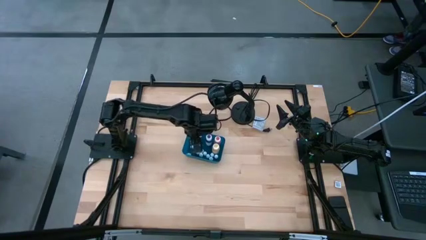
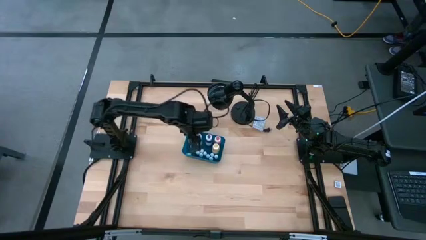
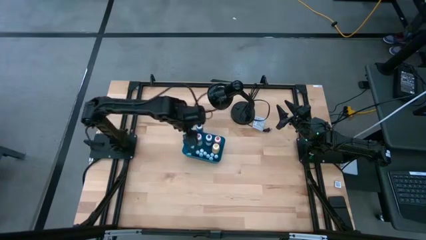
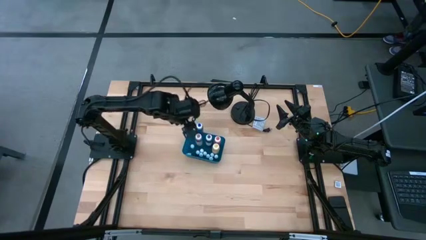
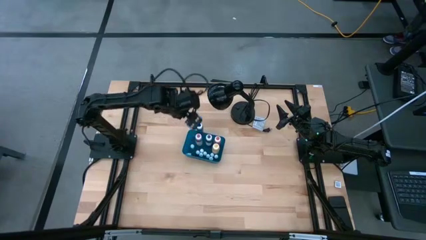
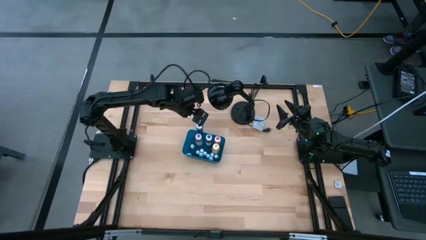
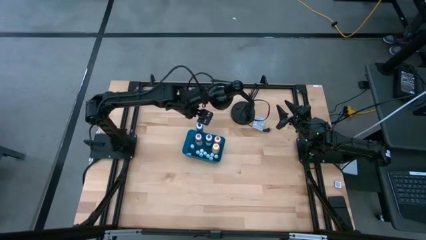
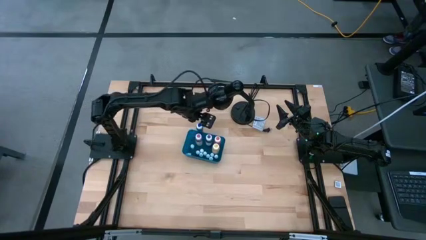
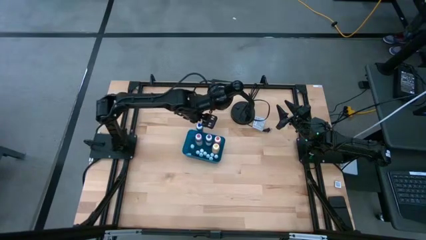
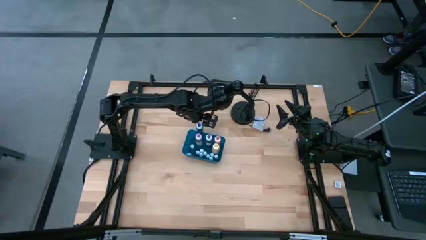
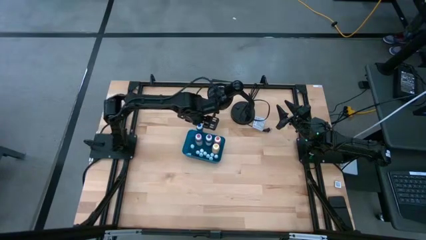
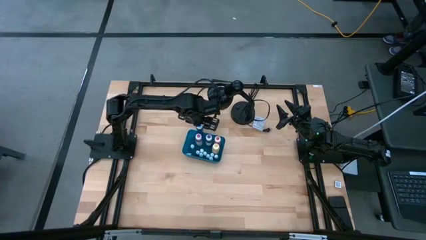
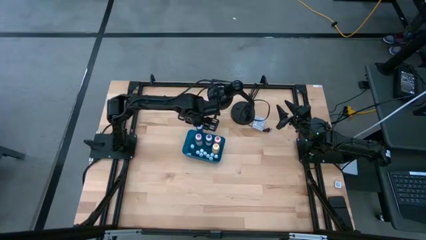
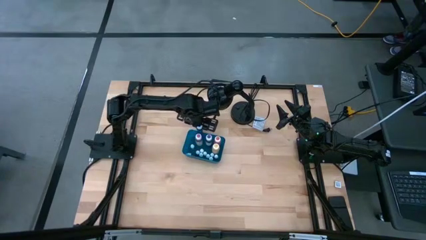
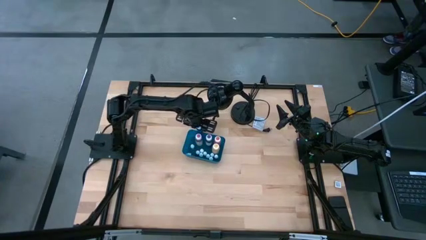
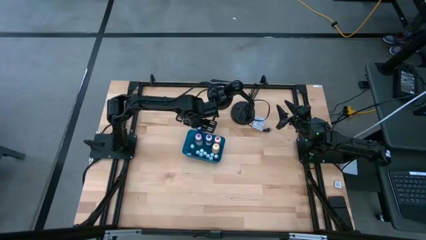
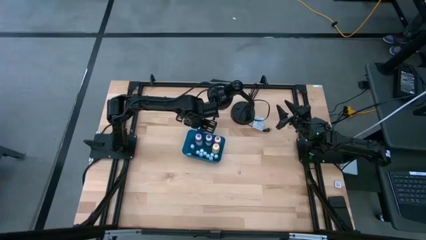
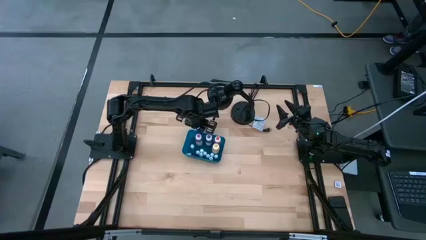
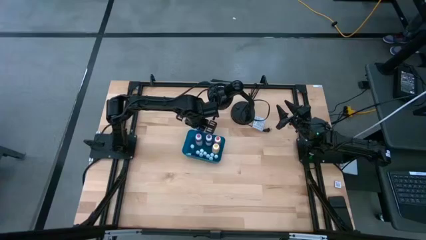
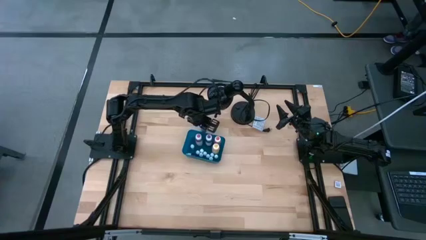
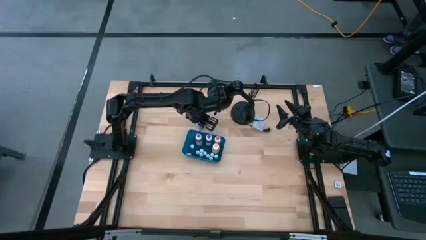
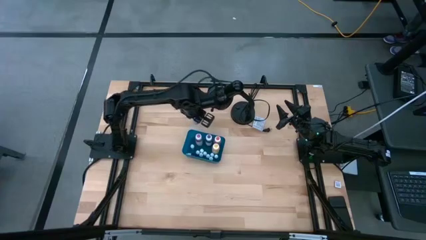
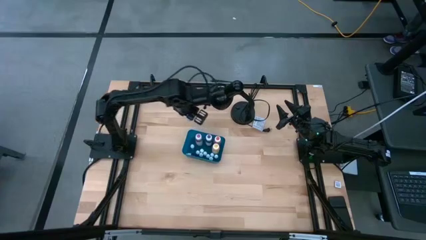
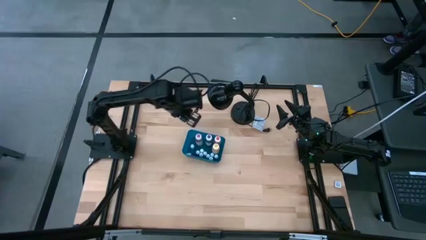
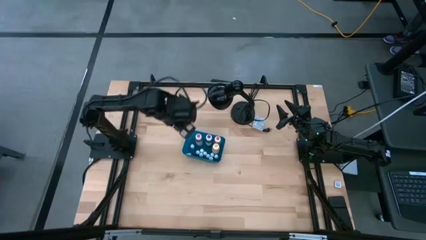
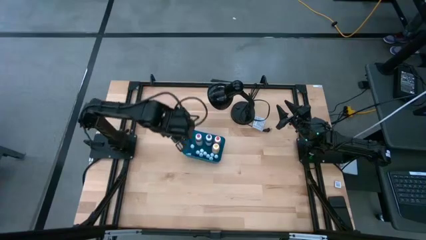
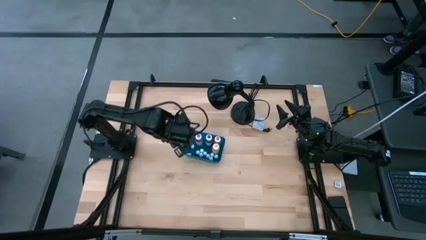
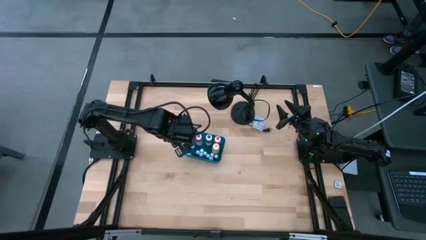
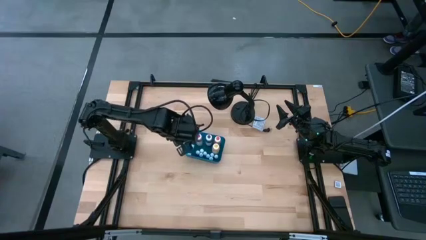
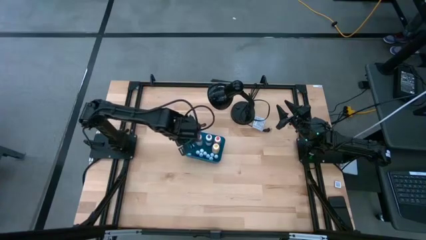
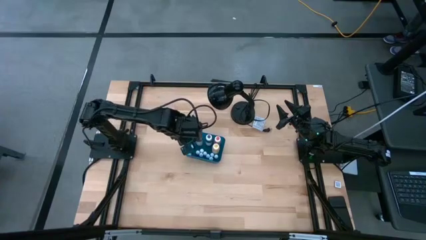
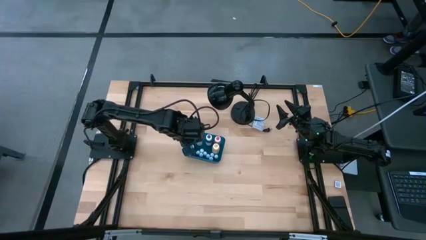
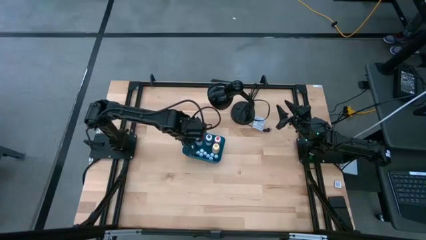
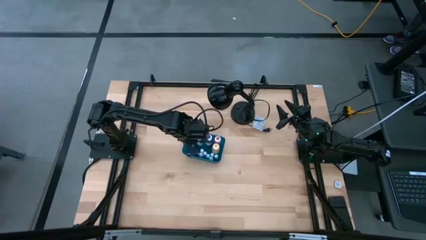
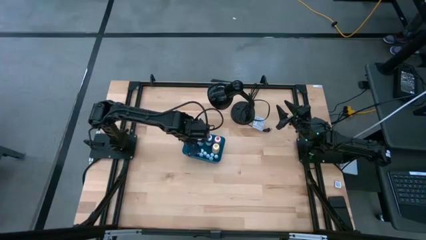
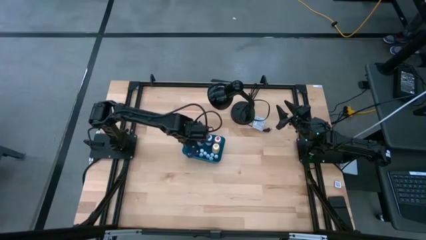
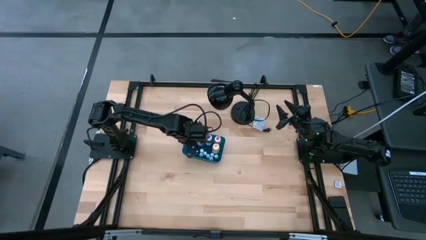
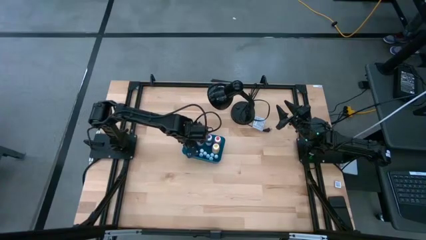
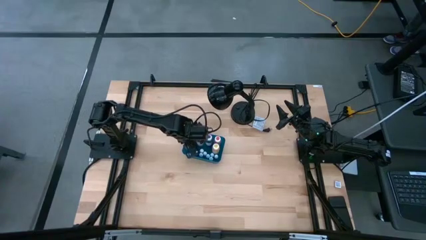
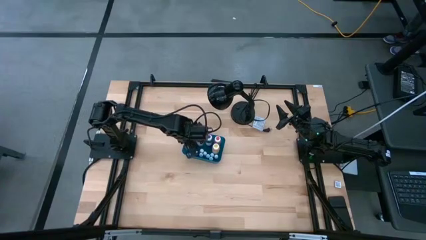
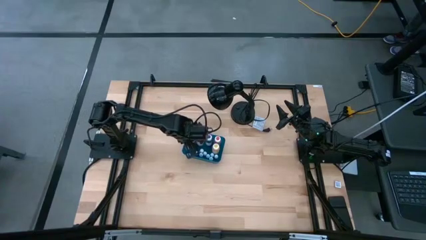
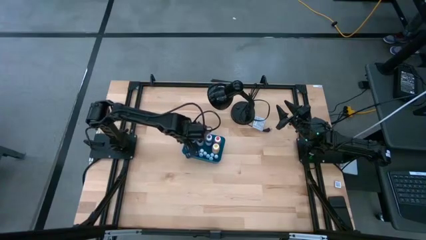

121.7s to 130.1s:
Task: Pick & Place food coloring
Put the large blue food coloring bottle into the blue bin

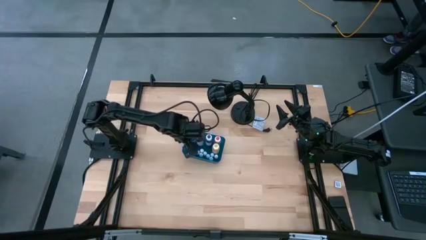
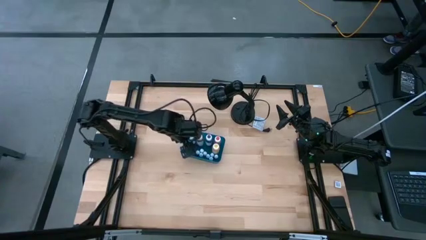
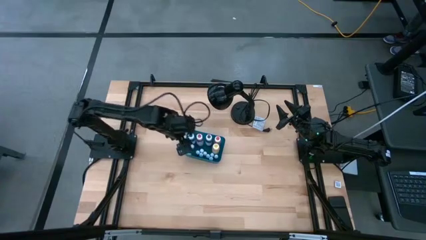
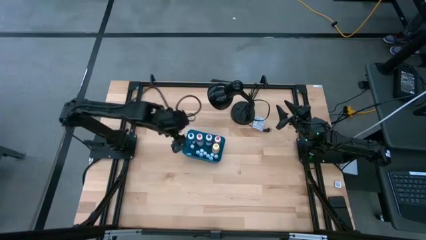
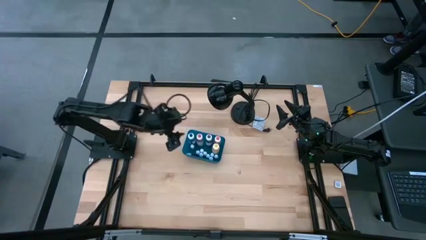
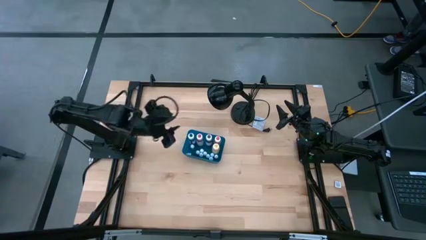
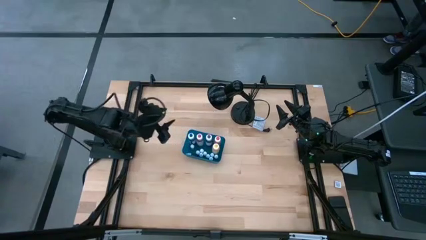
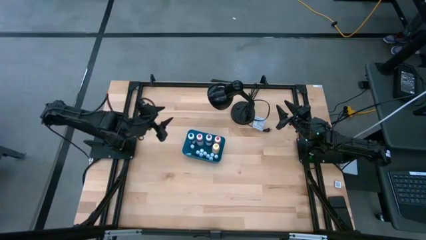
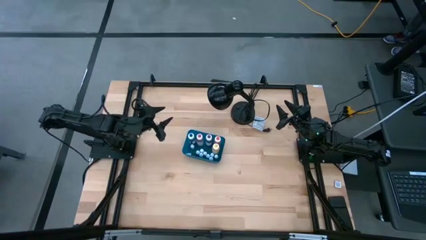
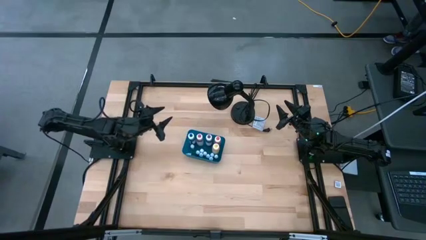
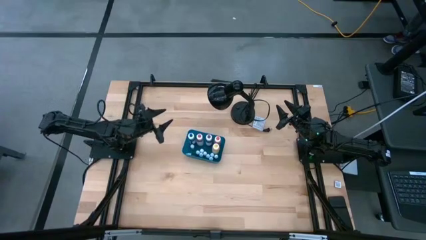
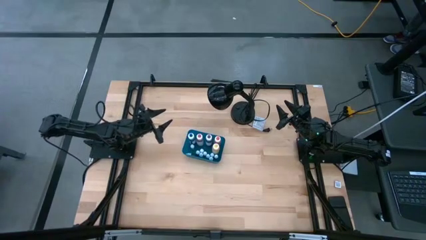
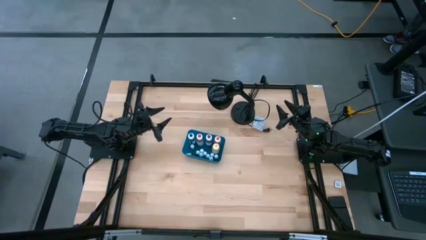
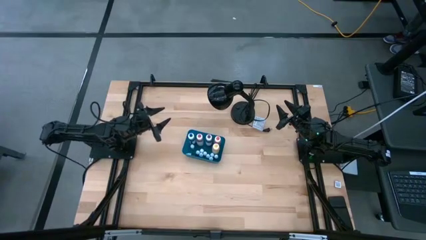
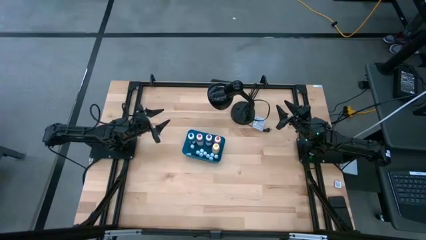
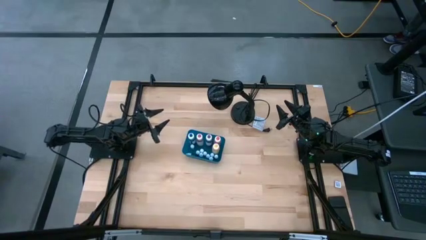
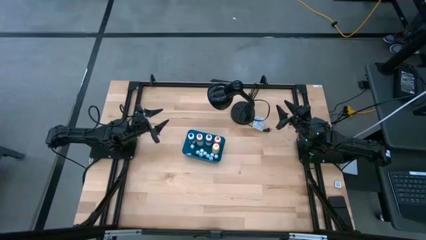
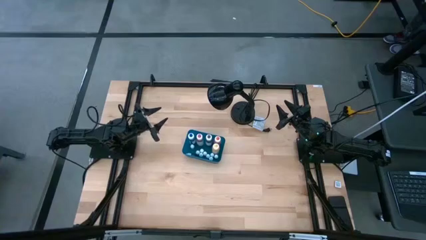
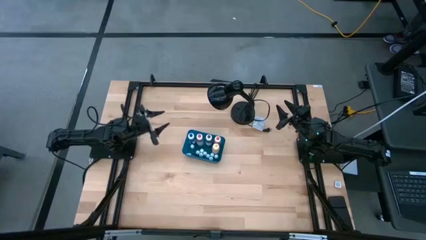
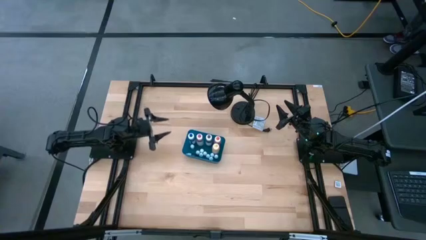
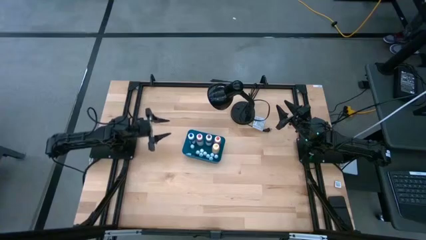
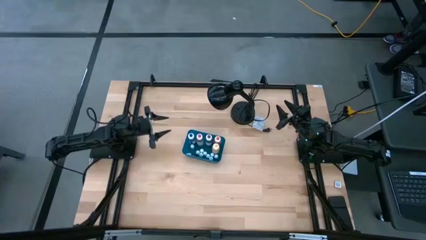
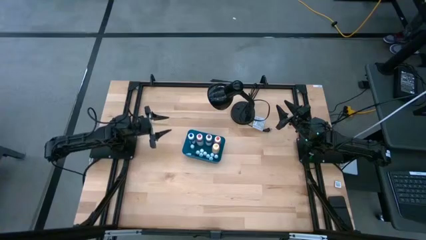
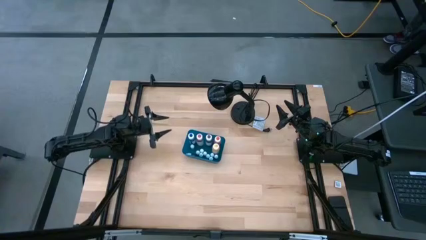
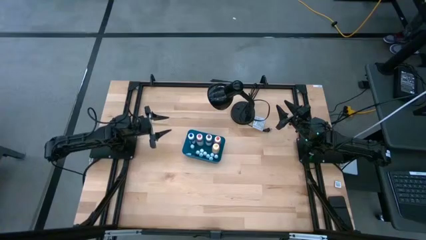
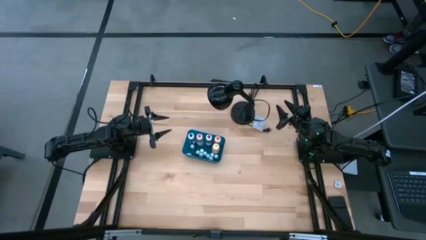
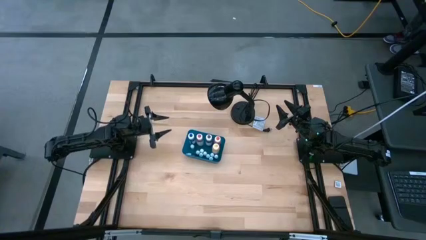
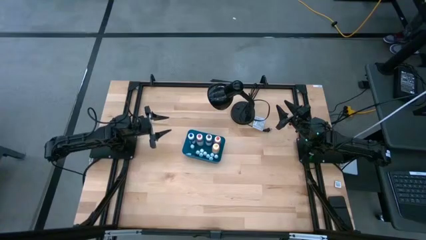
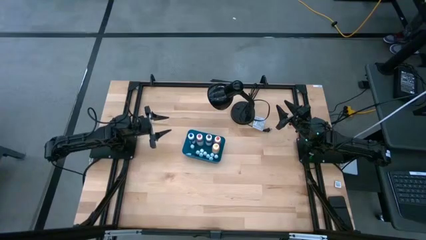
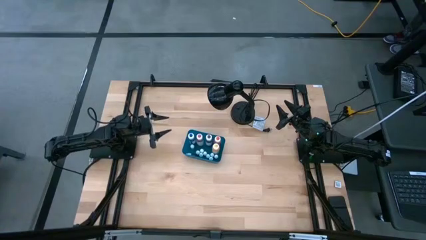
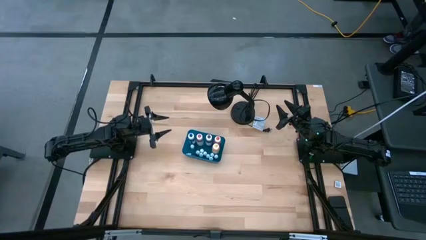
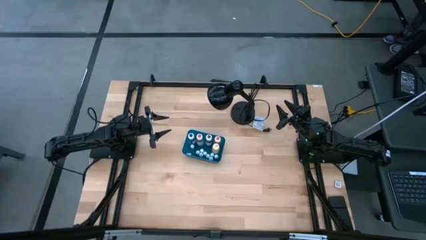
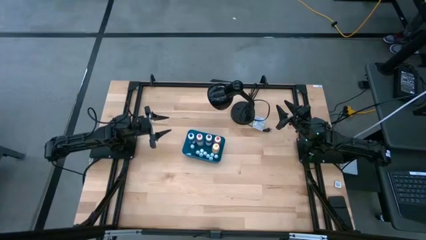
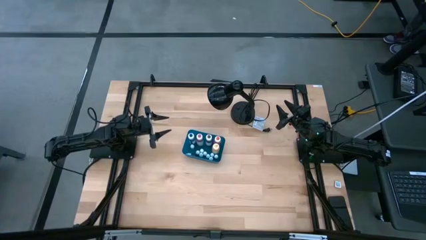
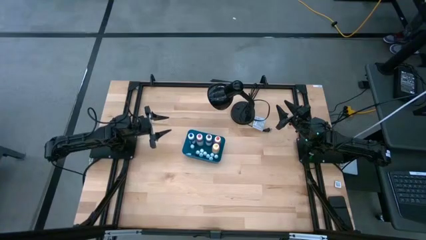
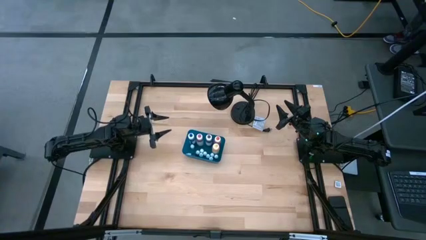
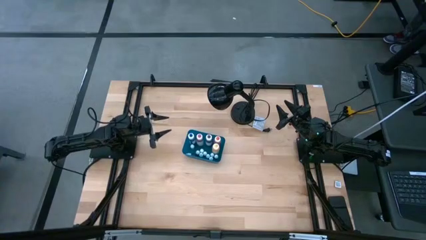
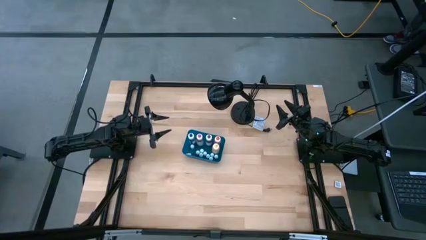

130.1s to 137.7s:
Return to Home Position

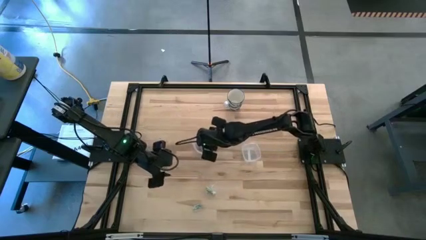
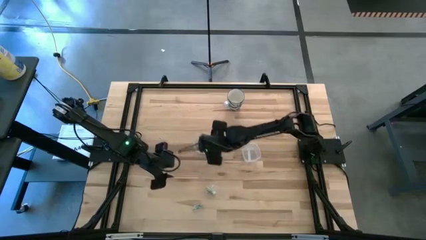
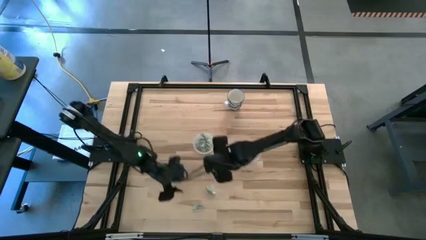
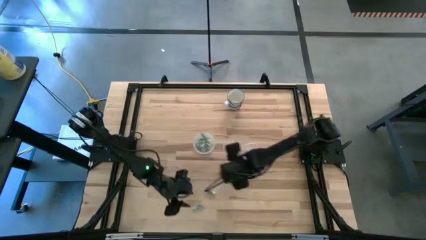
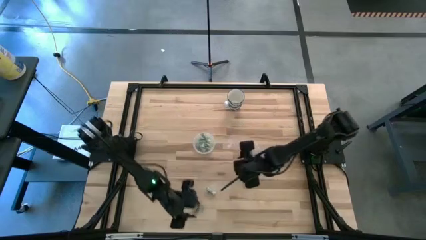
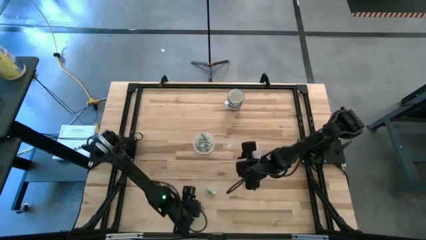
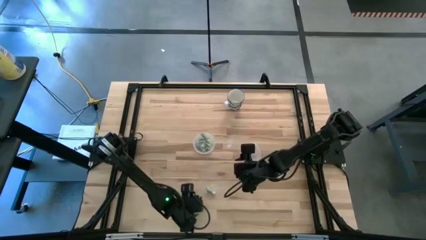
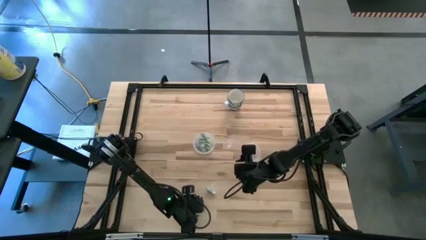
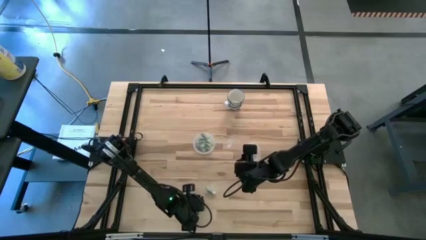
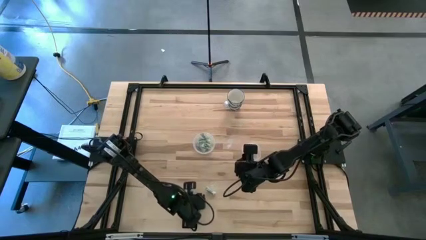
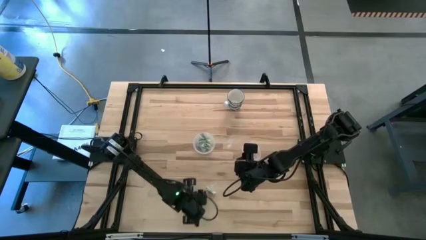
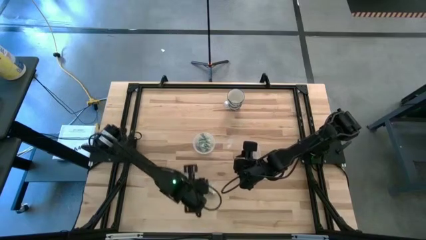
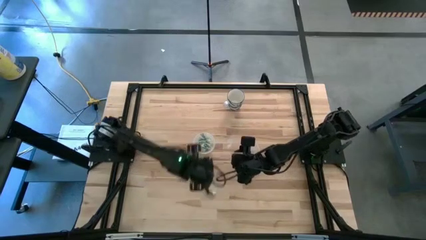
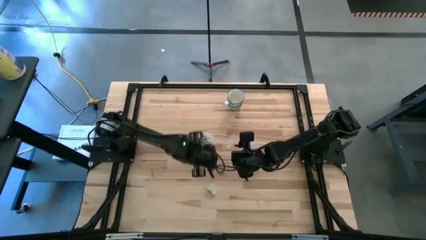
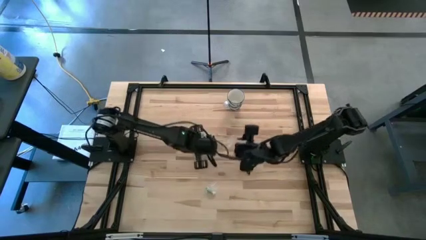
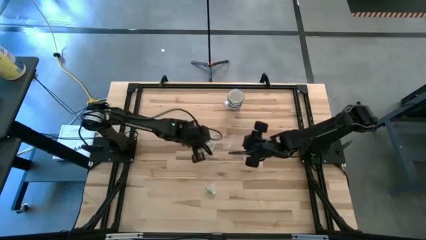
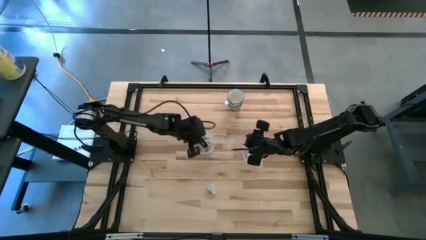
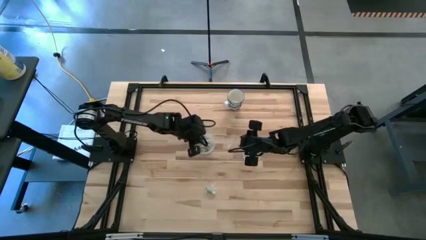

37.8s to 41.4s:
Task: Pick and place Stevia / Truvia into bins
Put the green stevia packet into the left transparent container
